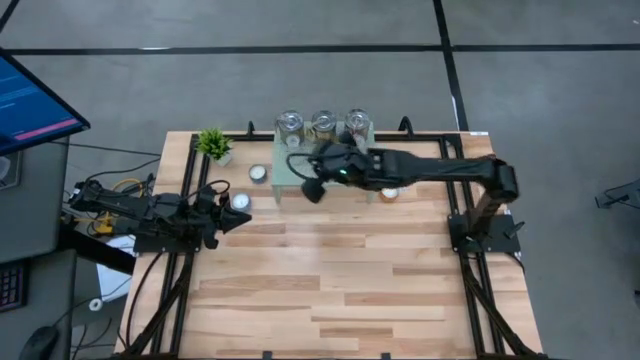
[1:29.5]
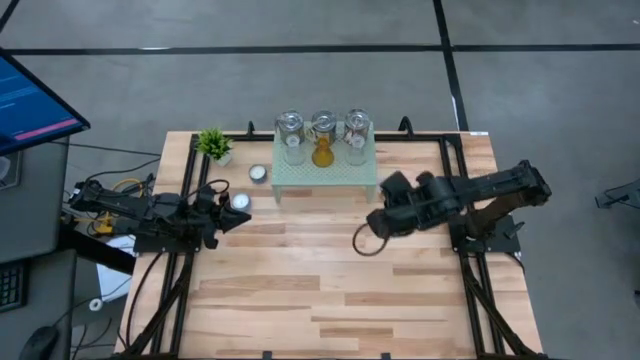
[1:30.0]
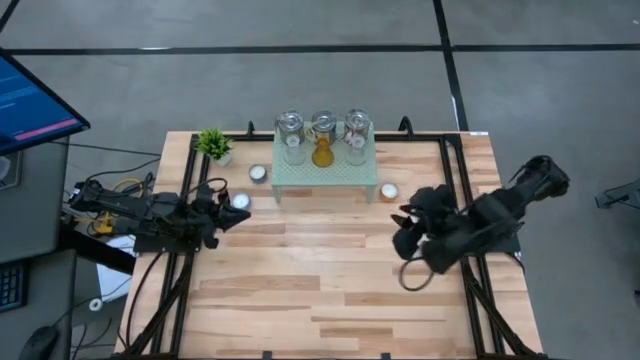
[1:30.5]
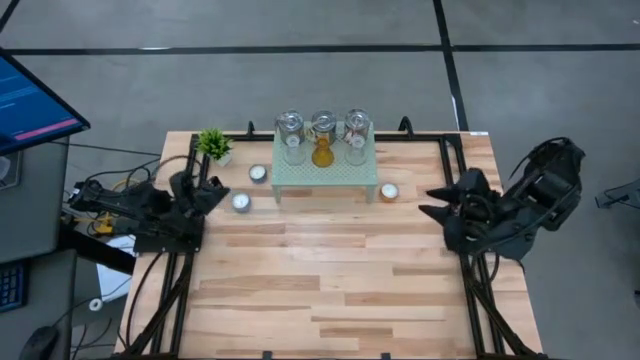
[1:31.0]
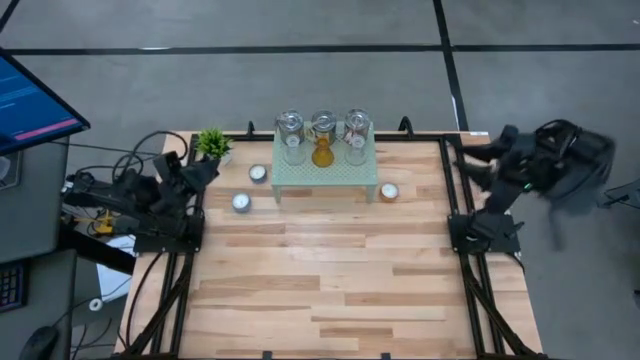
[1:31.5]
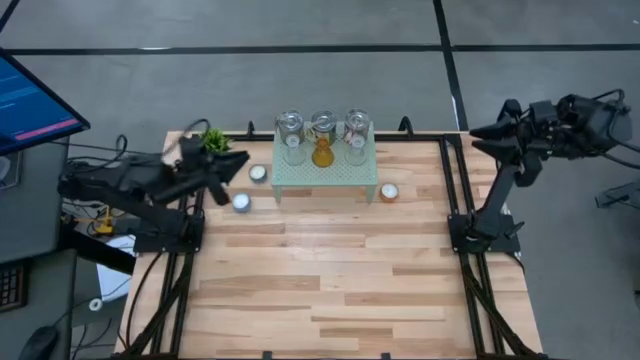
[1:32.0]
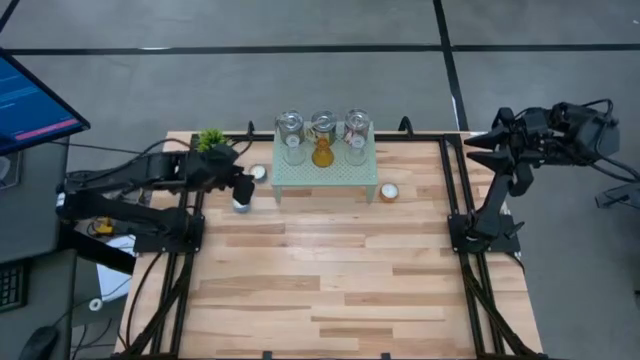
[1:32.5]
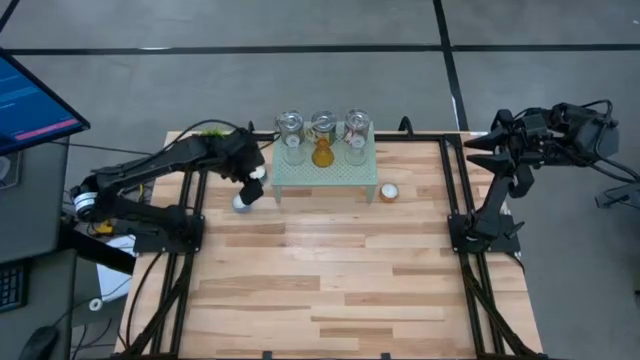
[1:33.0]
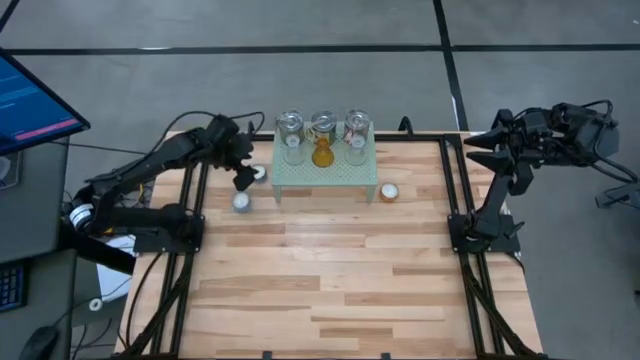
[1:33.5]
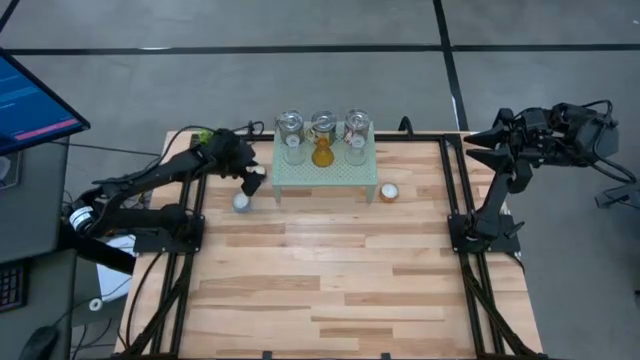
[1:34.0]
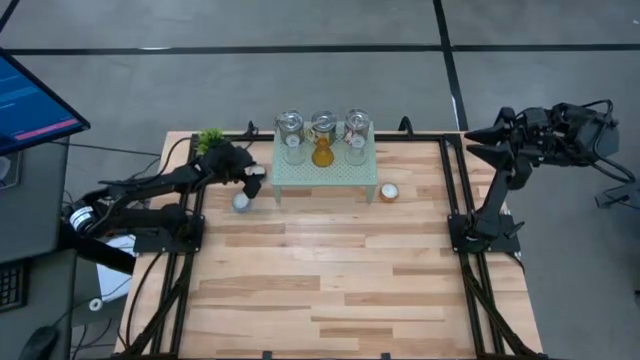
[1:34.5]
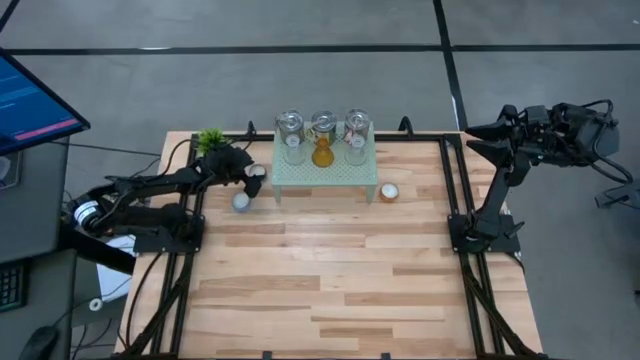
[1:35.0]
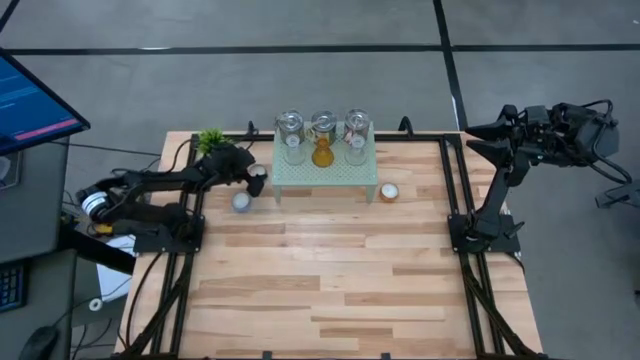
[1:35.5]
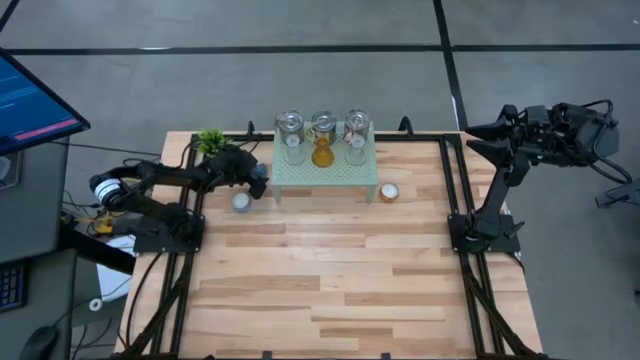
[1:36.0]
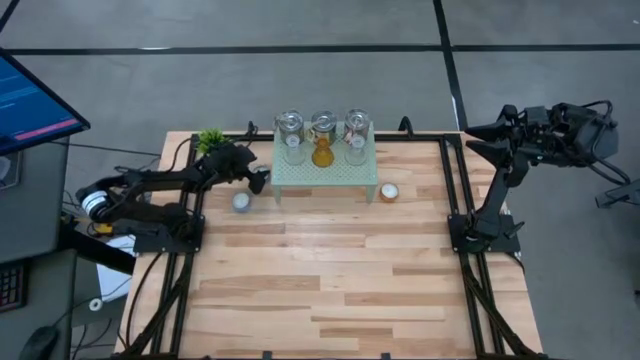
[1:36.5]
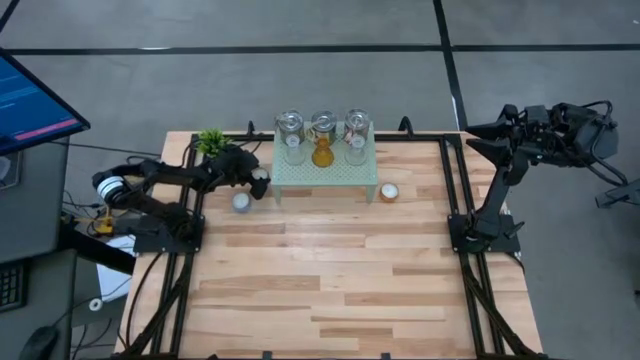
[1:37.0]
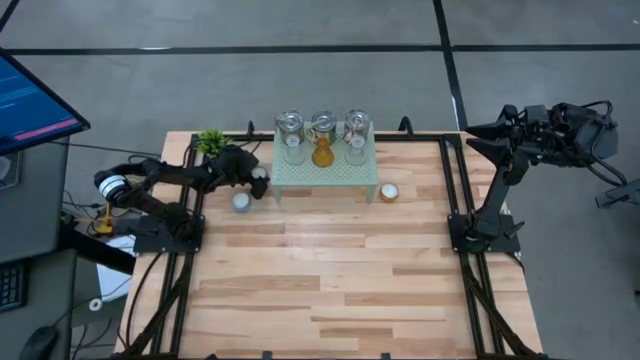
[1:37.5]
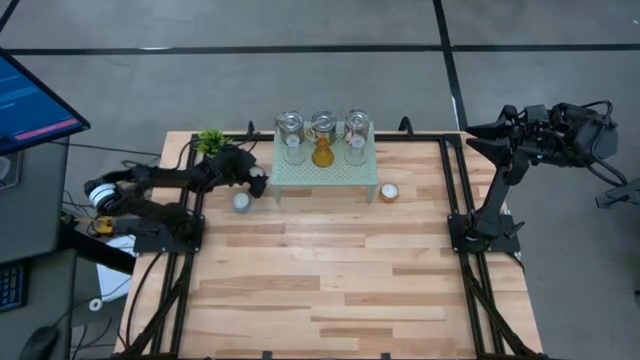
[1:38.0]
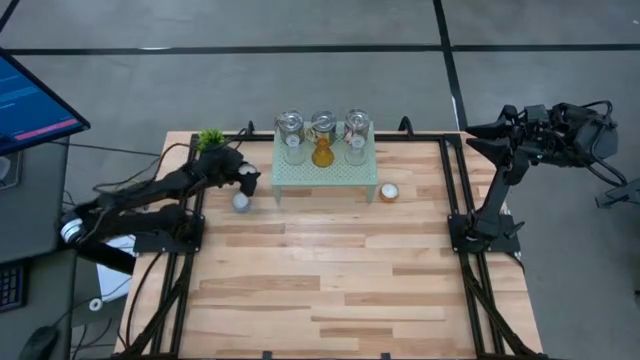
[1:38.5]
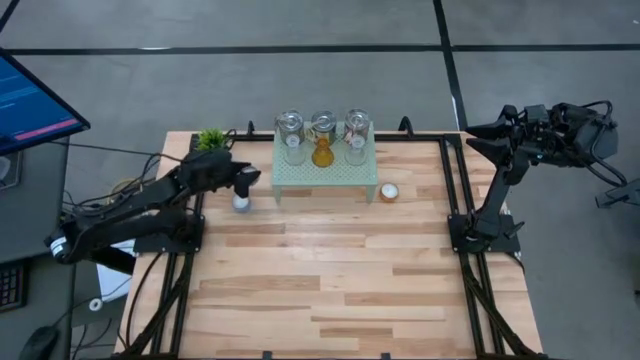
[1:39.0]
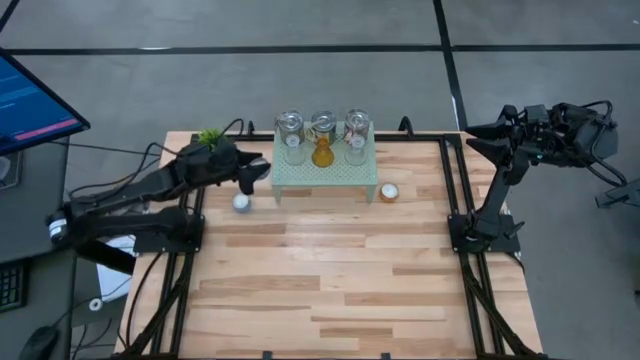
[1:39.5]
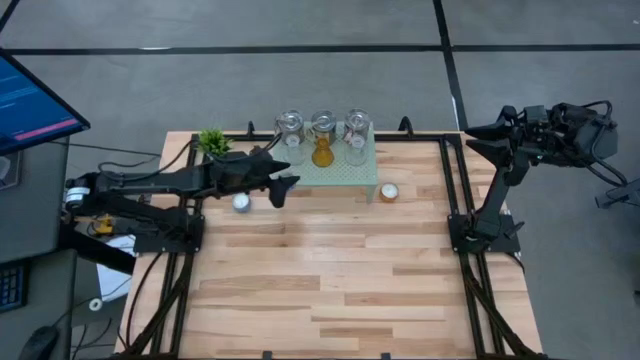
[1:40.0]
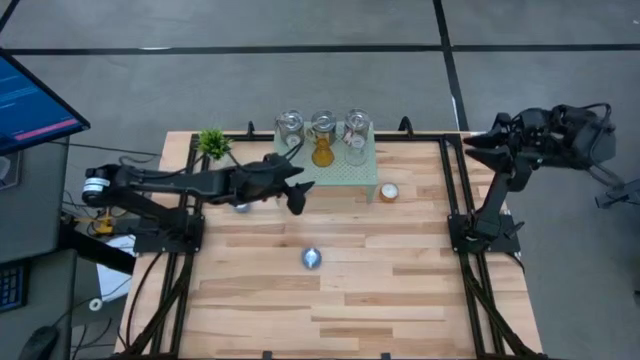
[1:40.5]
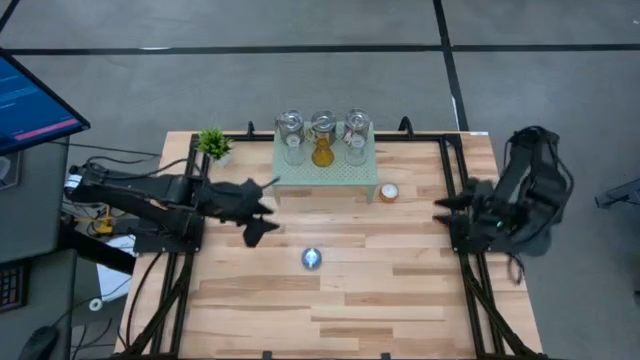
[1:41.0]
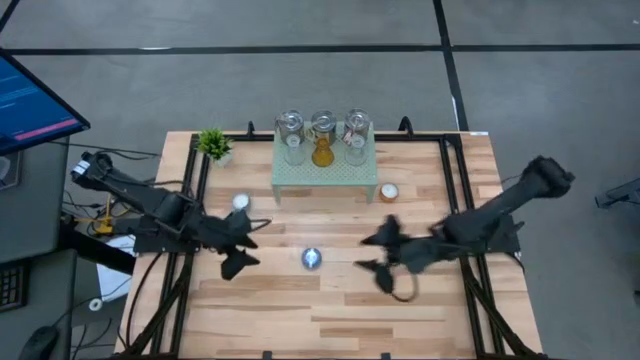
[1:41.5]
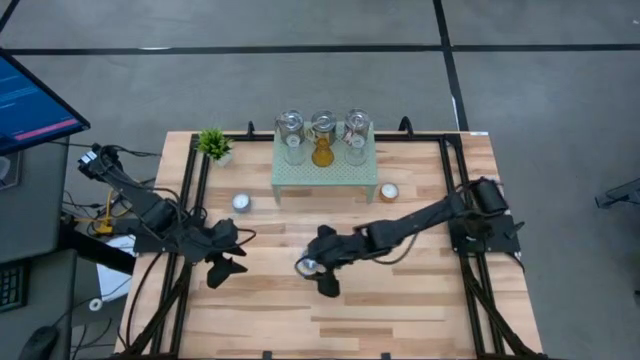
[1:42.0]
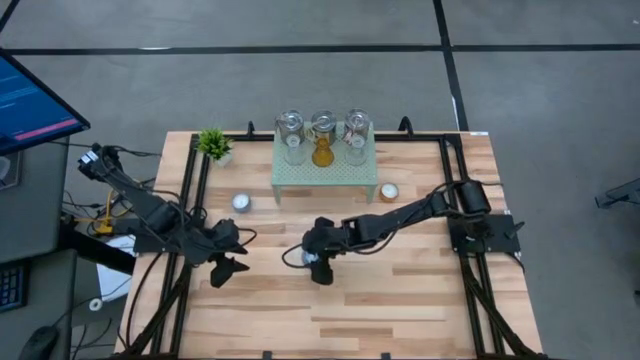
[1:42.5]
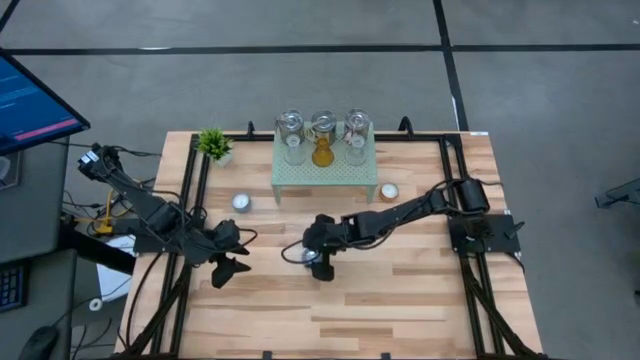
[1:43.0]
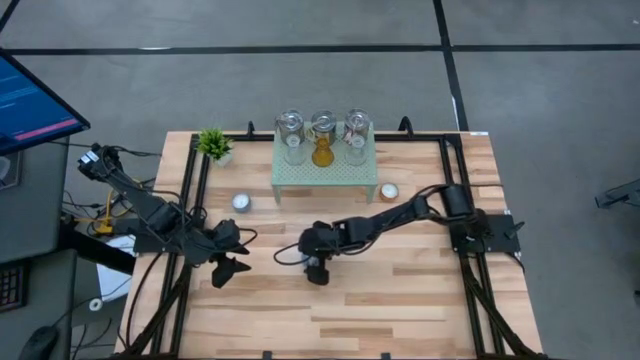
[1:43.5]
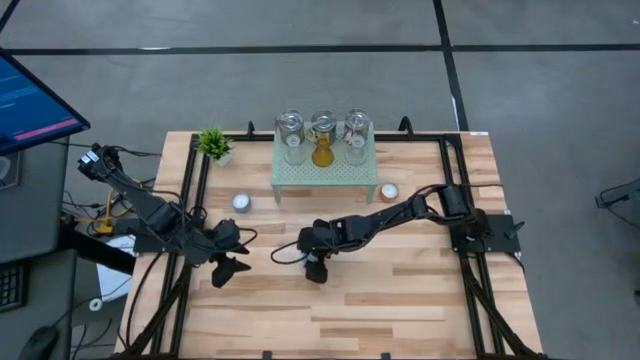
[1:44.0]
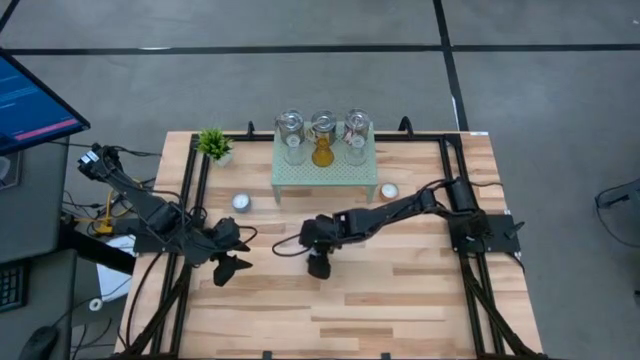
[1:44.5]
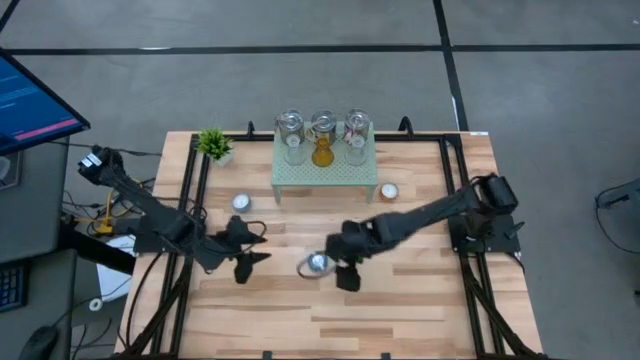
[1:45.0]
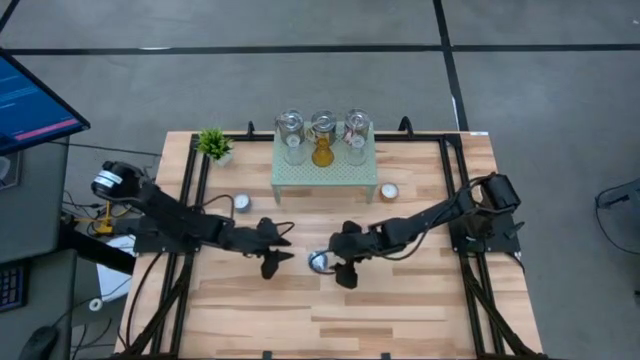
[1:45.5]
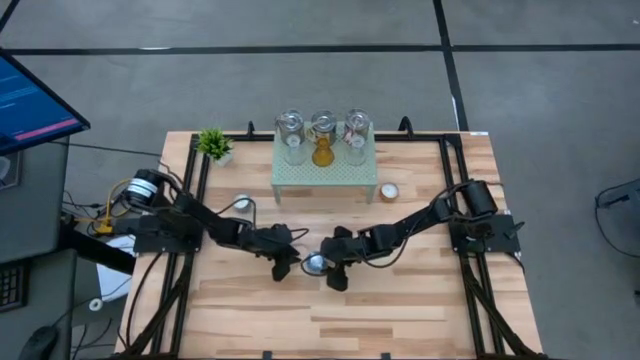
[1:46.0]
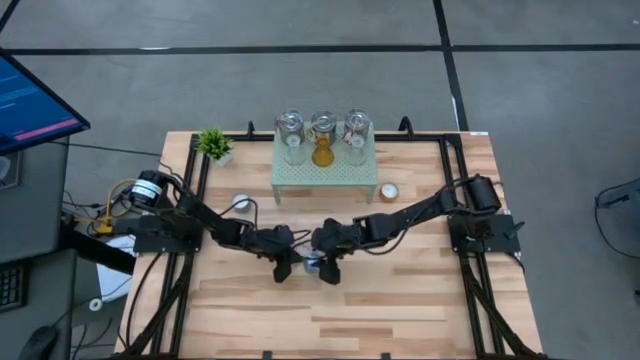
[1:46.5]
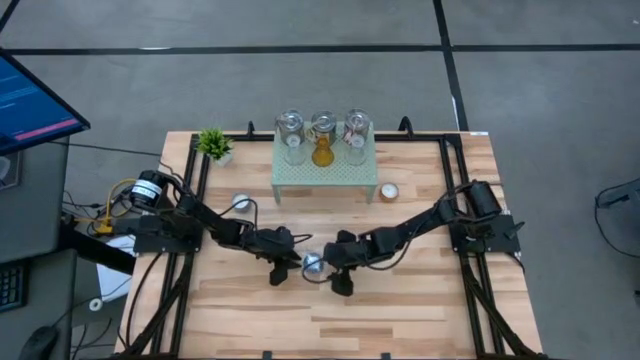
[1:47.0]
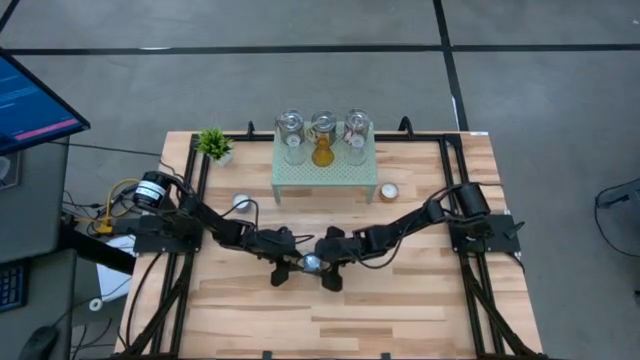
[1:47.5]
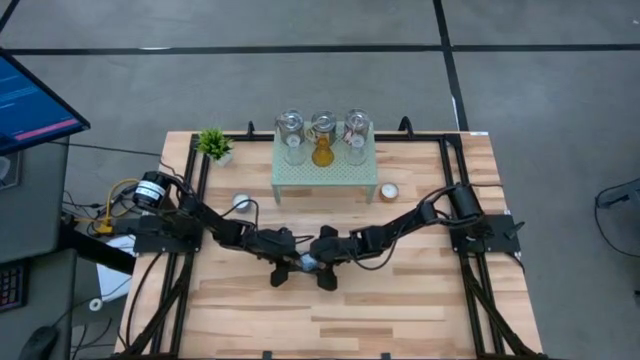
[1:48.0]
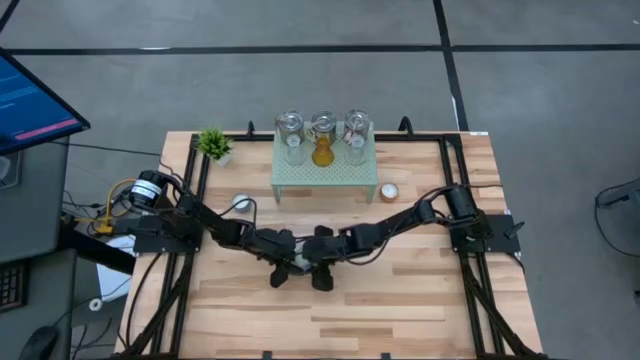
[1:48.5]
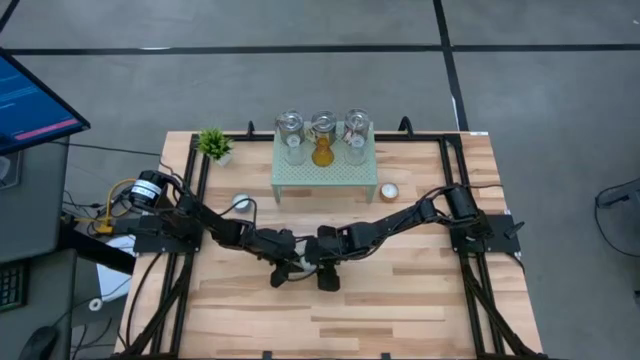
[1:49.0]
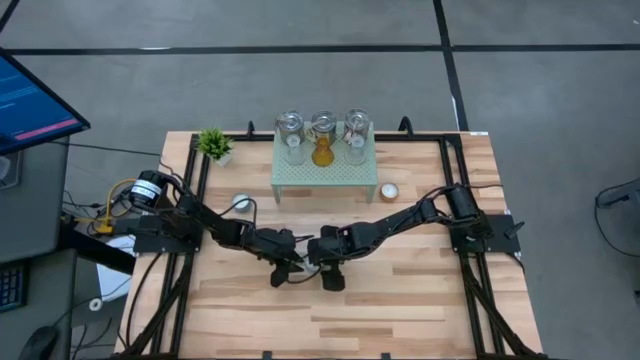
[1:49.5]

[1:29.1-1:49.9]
Task: Pick & Place candle stick holders
Put the blue scented candle on the shelf
